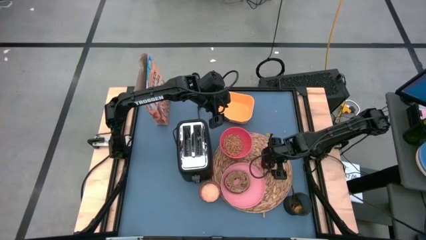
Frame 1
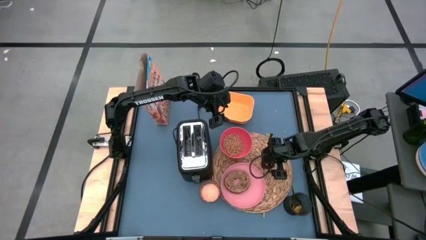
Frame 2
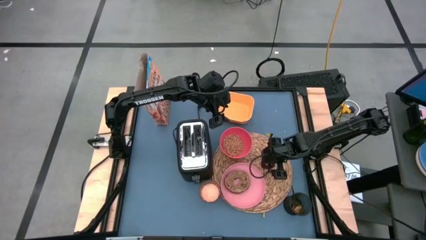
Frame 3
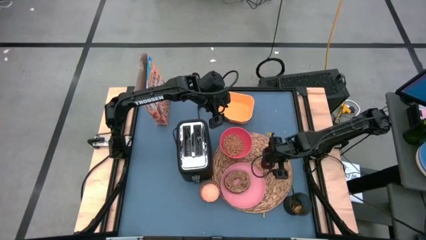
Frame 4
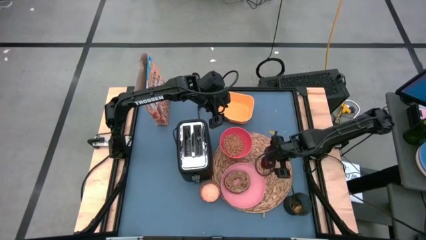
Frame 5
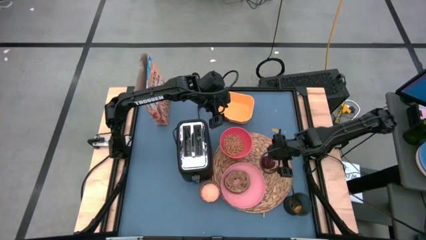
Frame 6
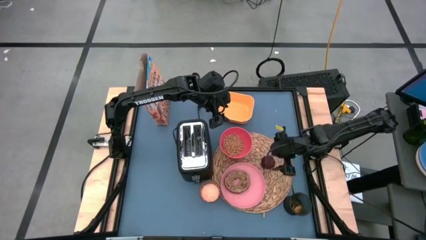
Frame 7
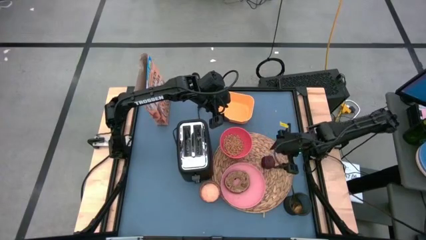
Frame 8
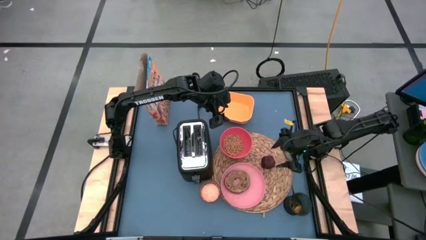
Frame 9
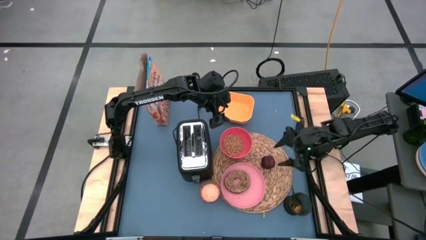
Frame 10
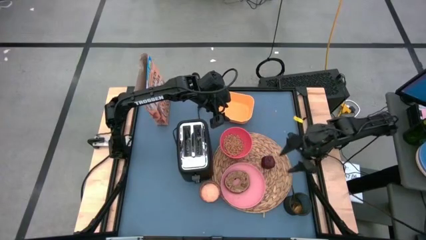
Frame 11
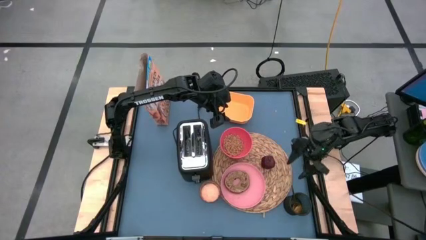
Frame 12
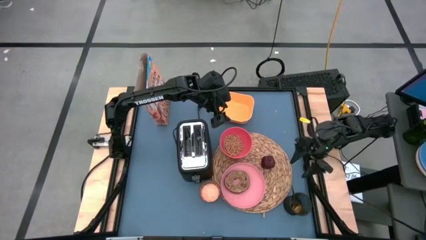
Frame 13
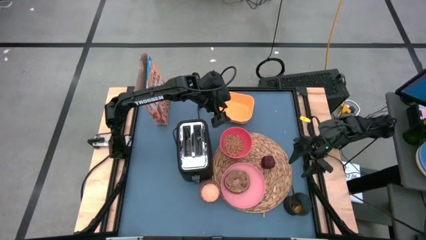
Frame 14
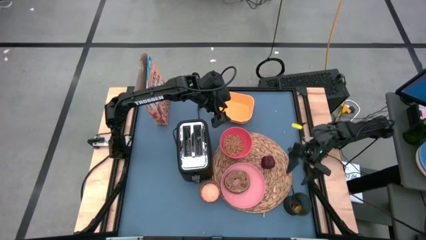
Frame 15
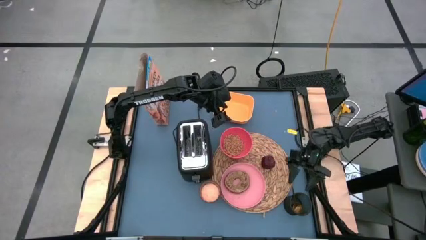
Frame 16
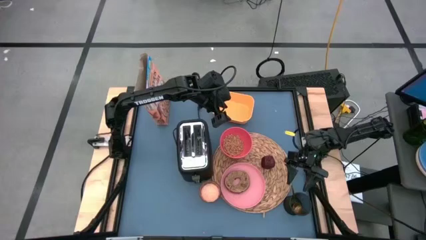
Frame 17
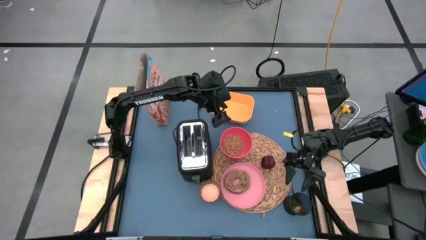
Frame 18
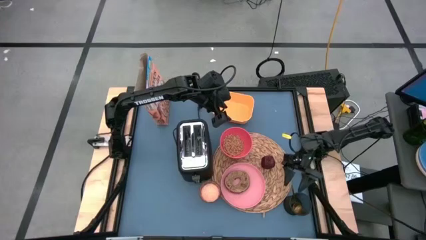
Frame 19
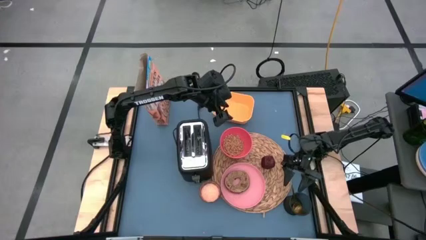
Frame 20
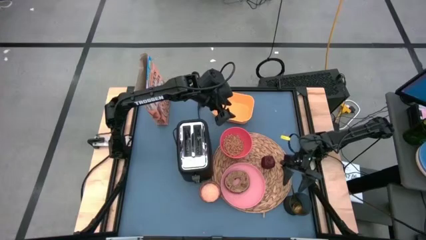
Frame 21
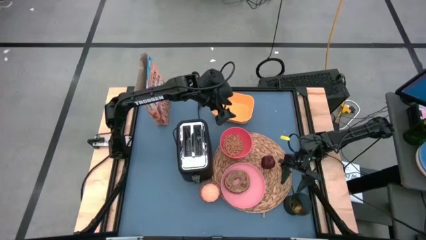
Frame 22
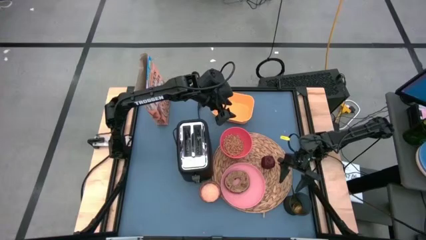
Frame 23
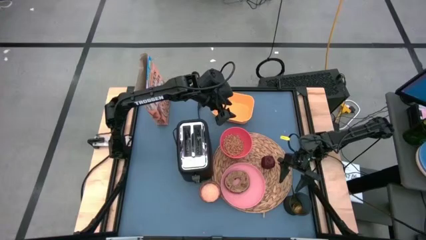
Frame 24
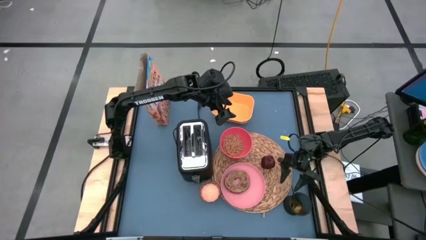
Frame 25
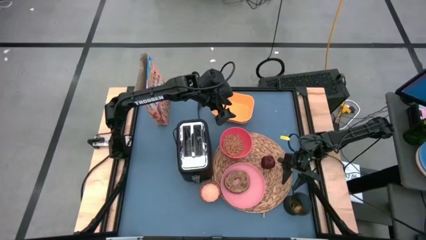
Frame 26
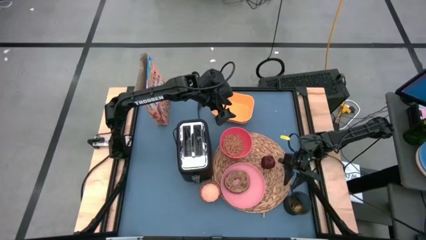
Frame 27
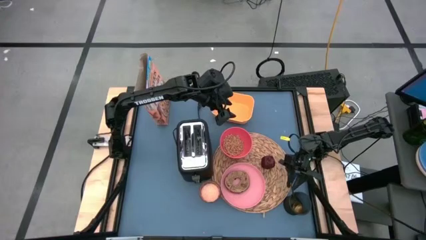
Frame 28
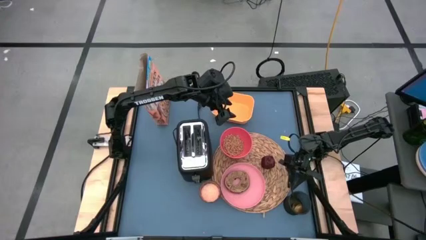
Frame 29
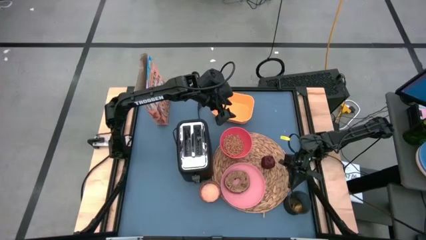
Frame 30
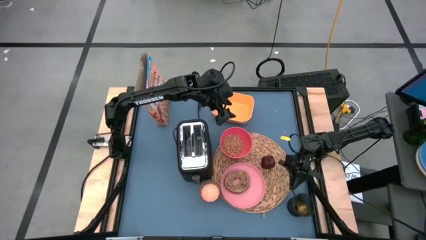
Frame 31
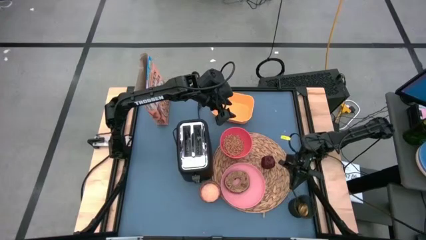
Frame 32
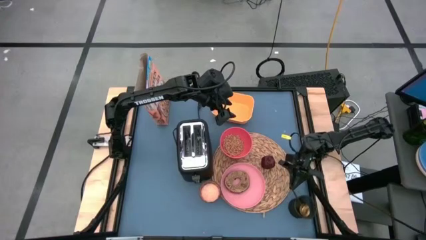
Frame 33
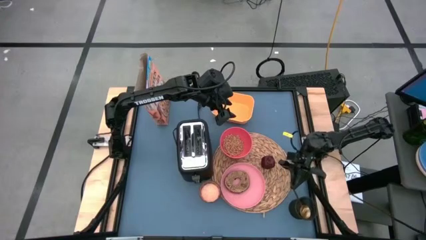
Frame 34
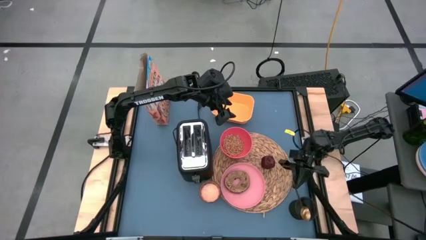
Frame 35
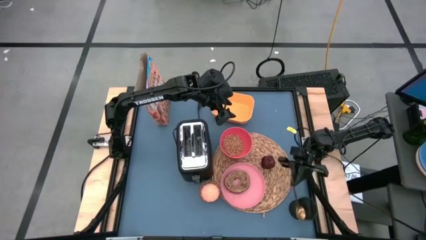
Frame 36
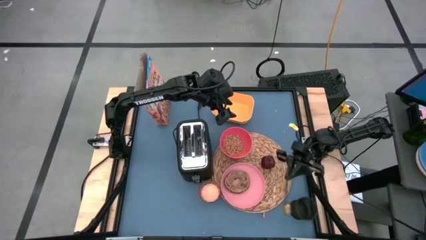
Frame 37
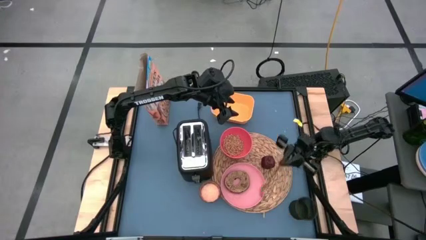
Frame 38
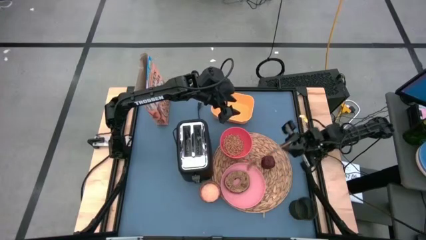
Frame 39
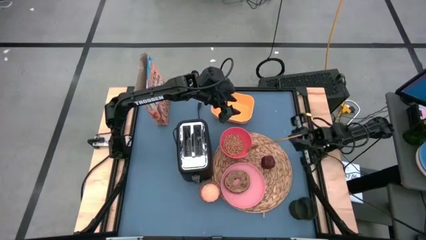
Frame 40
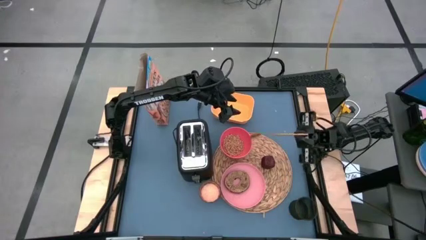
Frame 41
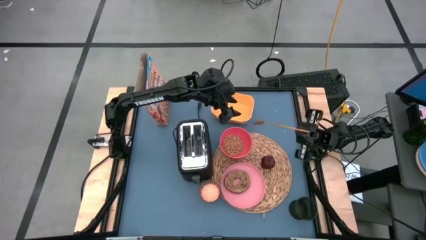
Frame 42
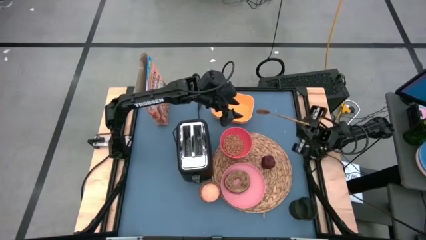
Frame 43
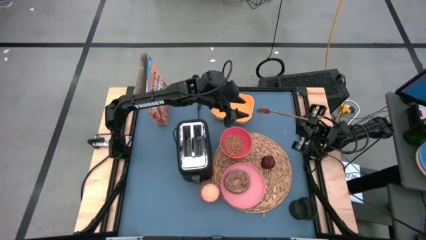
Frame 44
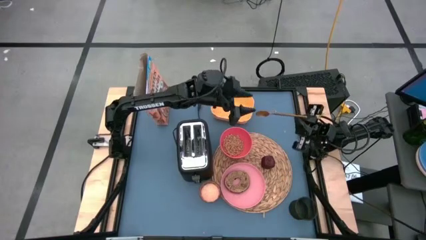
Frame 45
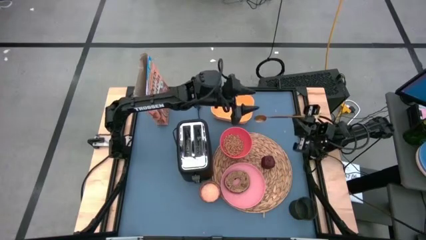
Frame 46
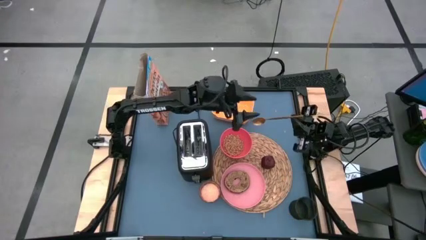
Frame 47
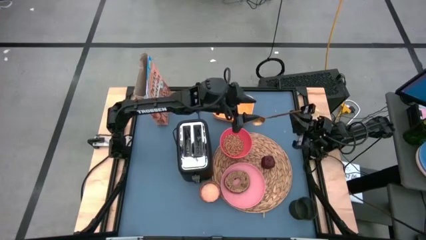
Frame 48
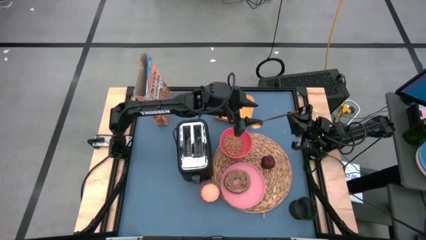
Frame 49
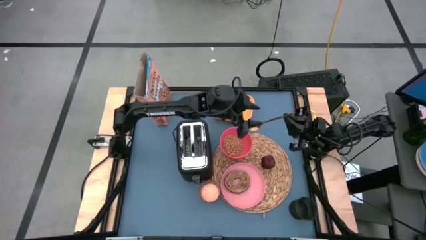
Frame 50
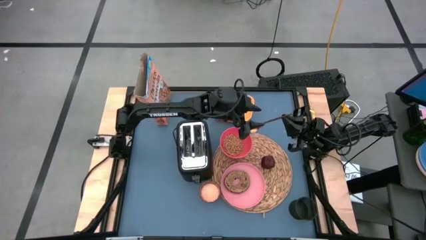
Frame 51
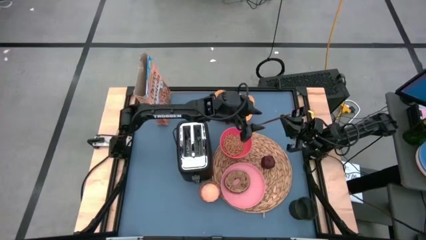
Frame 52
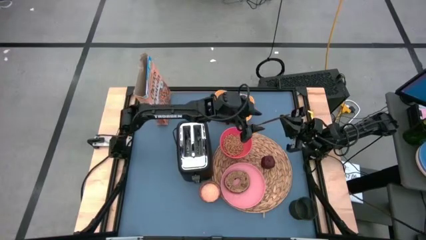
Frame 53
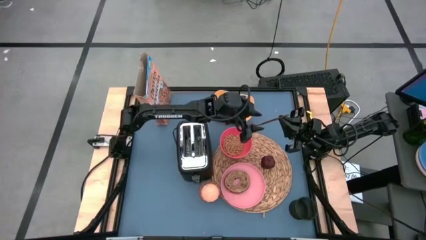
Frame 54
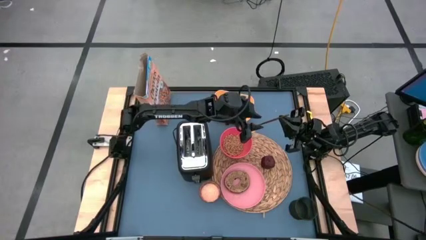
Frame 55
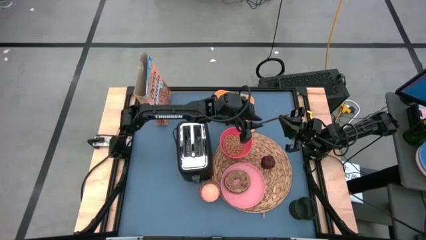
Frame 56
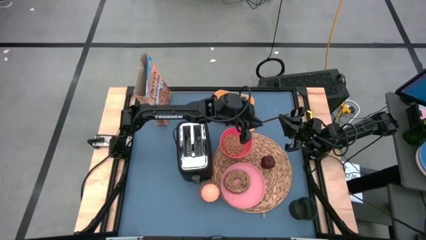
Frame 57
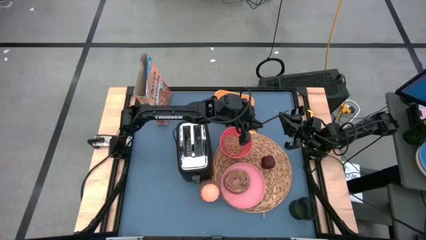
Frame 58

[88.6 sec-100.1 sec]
Task: Arrange a breakfast setting
Put the gold spoon on the table mat
